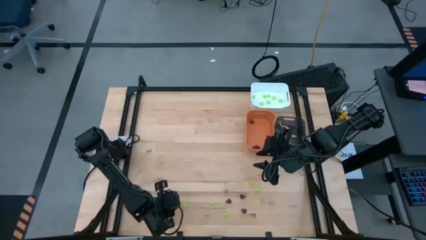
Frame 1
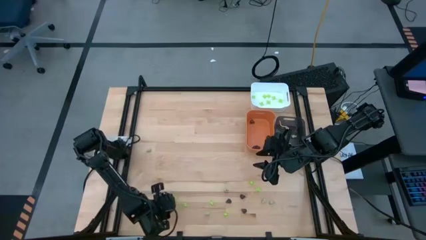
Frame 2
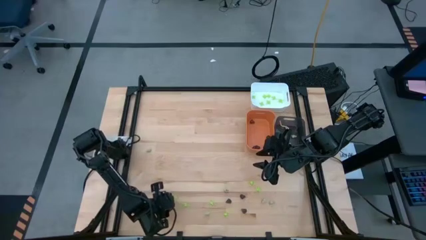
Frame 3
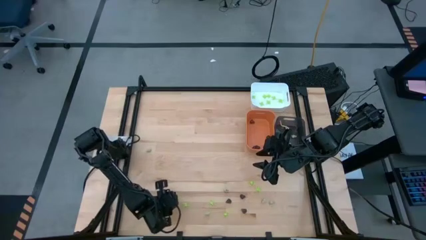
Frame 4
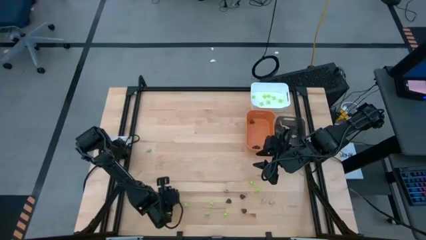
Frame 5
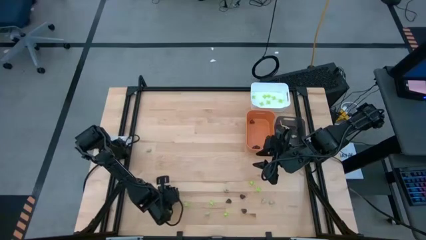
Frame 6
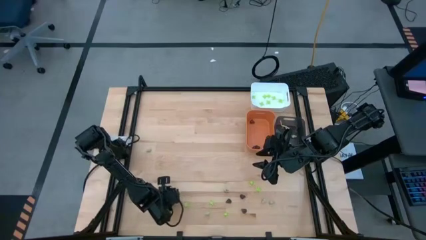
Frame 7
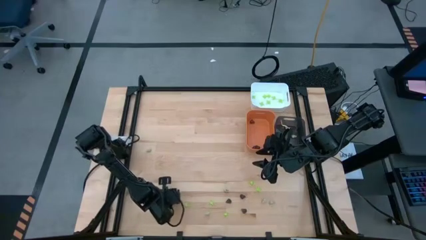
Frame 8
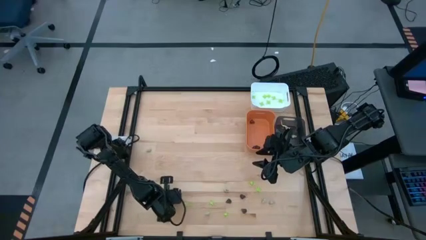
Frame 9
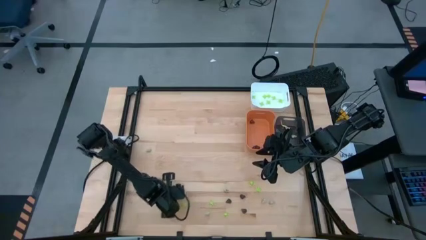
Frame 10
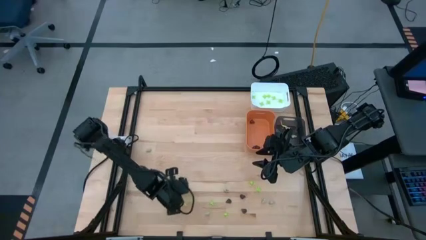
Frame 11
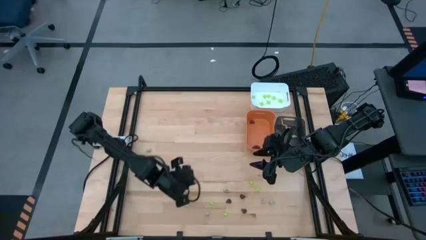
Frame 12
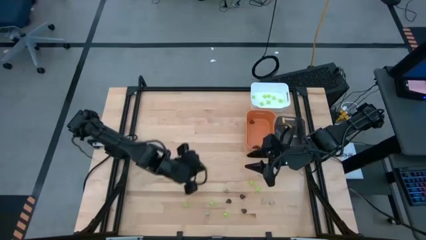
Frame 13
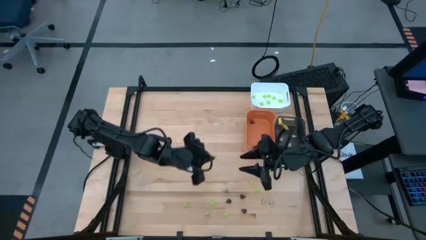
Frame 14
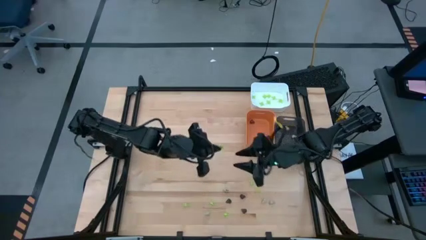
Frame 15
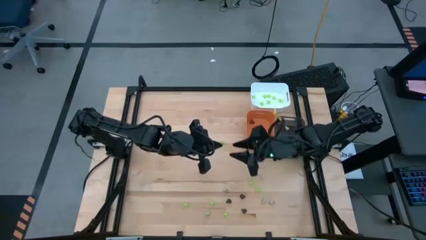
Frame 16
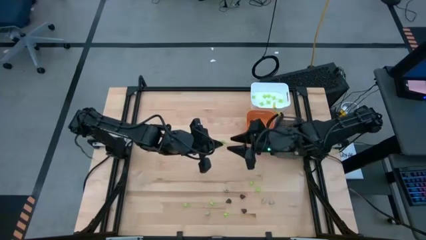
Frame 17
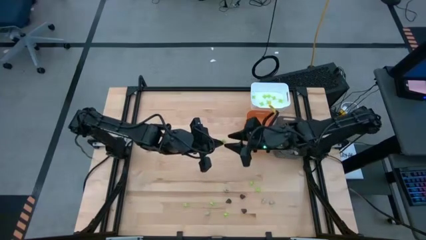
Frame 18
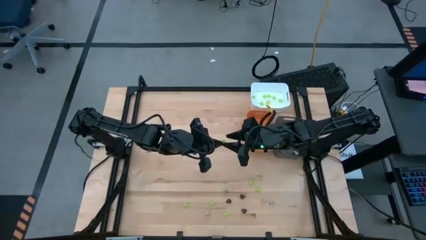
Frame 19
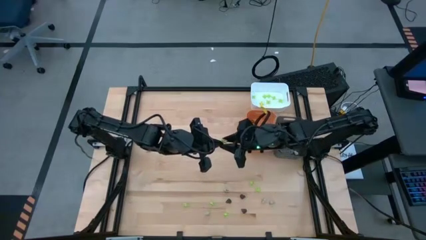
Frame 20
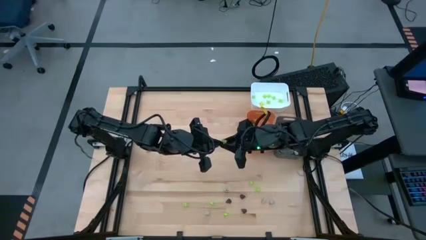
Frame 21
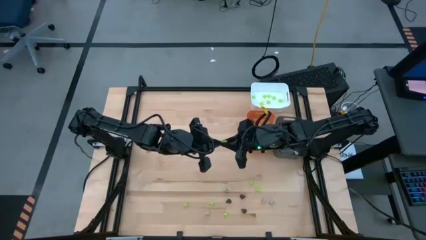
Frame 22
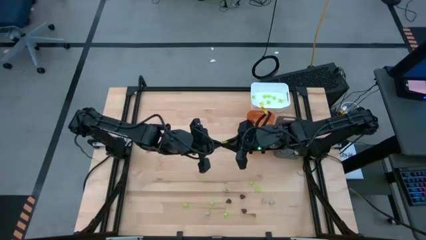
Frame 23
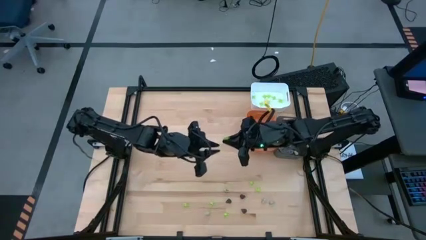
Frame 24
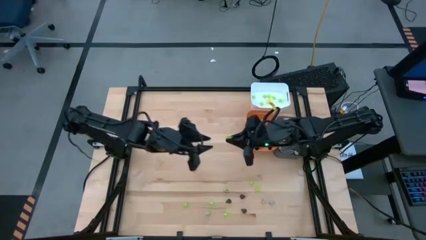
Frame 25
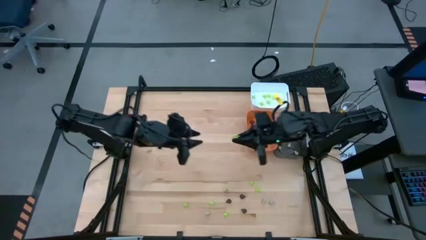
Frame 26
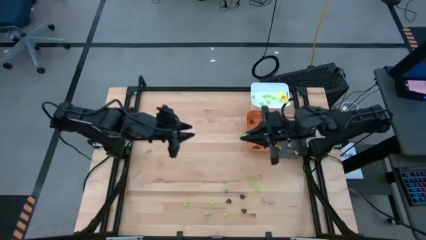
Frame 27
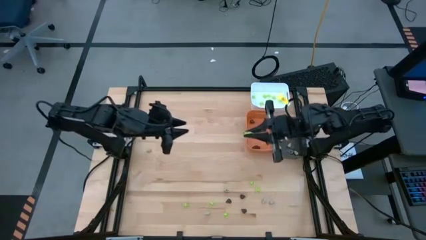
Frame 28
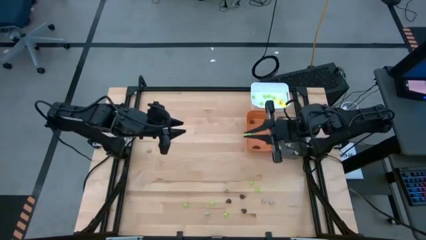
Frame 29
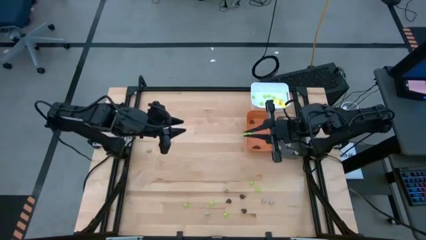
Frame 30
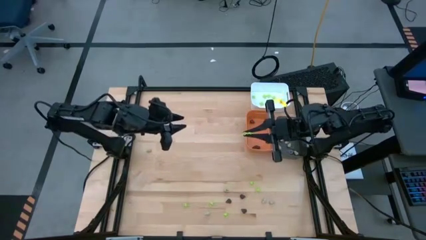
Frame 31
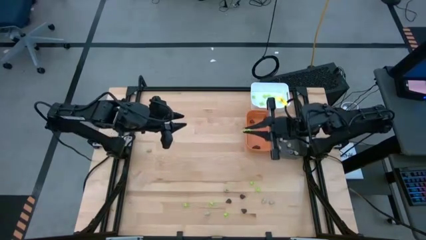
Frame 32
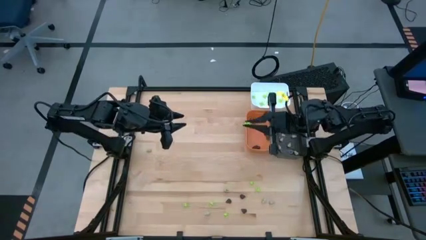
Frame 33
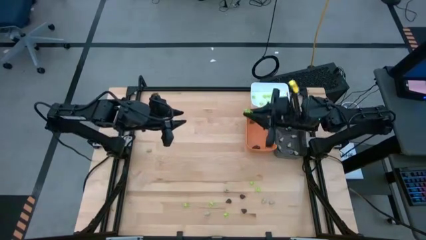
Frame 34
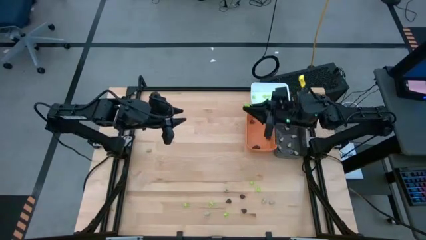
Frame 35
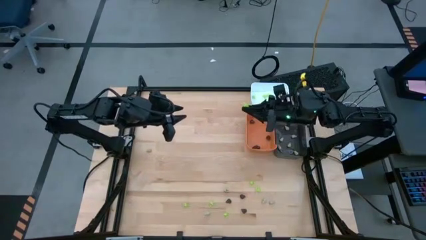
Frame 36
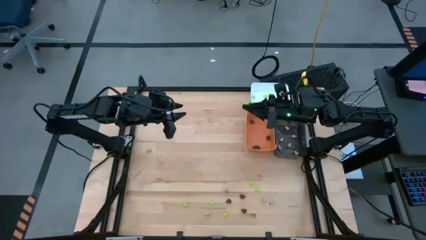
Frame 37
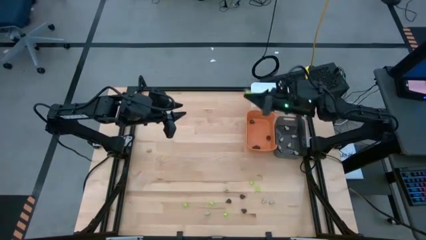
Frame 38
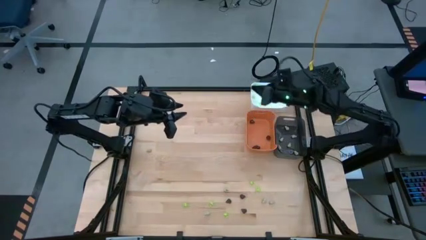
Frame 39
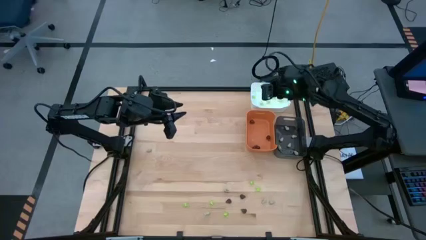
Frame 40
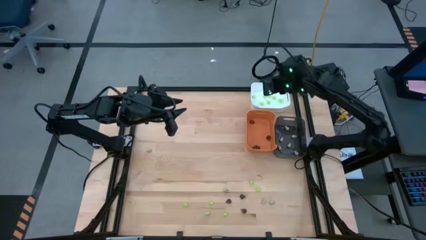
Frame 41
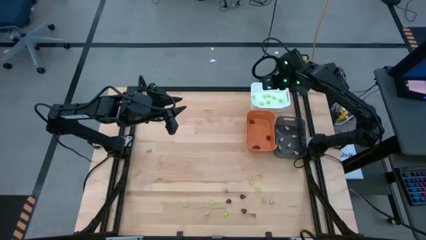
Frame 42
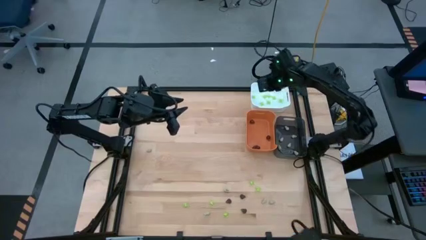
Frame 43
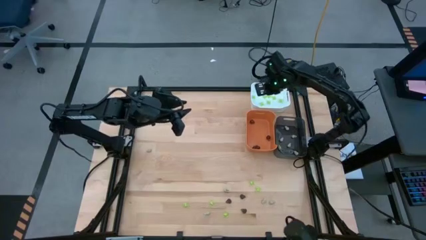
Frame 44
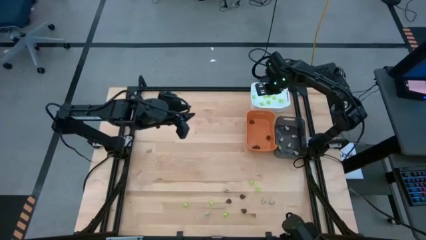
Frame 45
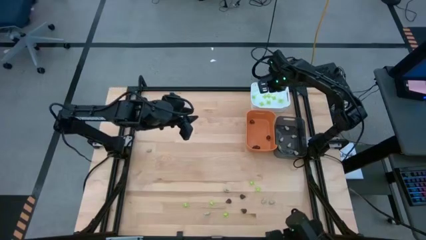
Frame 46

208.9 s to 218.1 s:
Task: Sort Halloween decoration
Put the green spider toy into the white bin

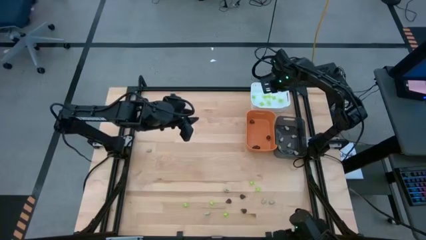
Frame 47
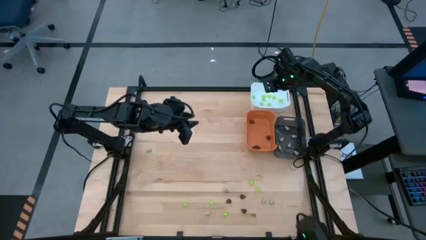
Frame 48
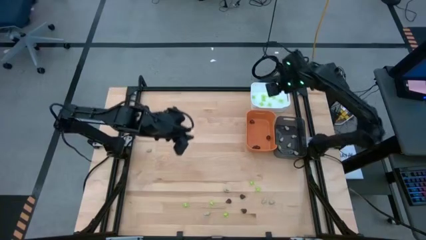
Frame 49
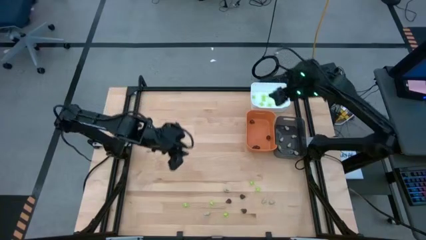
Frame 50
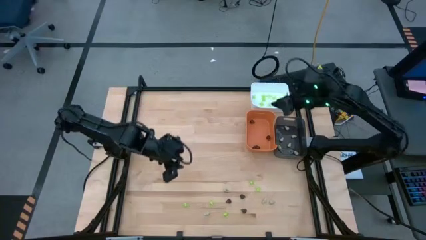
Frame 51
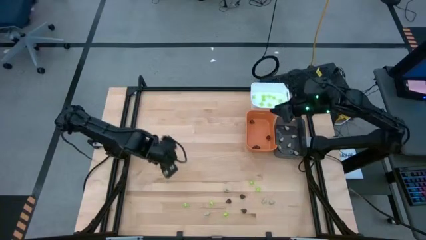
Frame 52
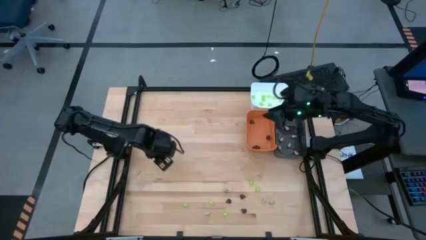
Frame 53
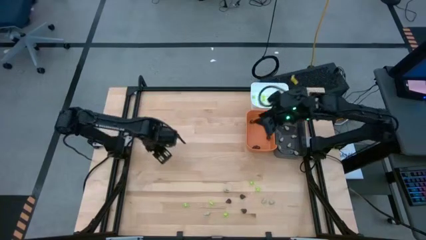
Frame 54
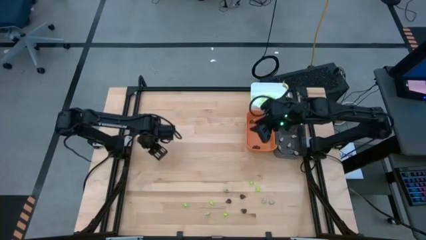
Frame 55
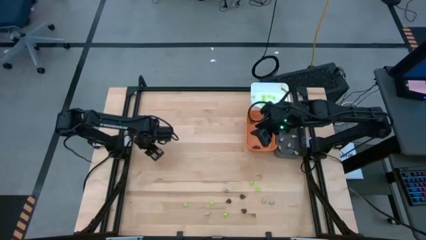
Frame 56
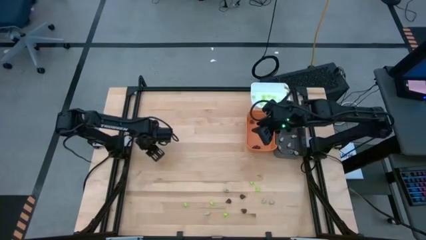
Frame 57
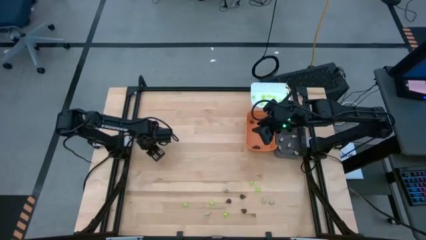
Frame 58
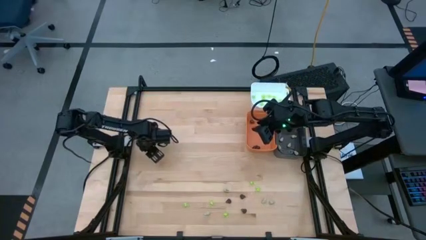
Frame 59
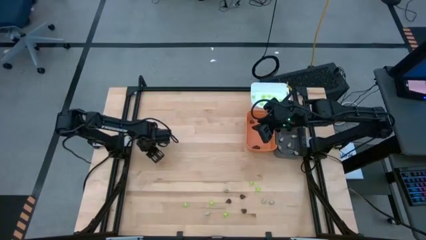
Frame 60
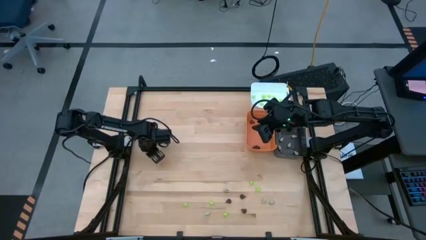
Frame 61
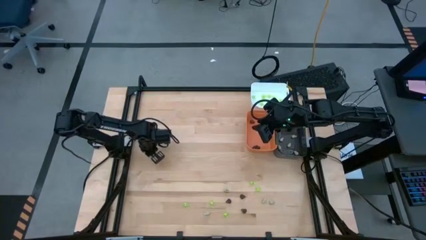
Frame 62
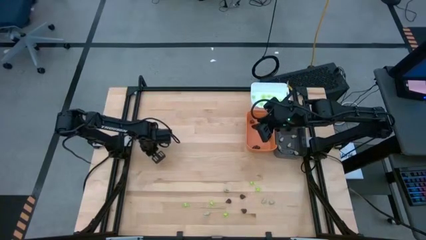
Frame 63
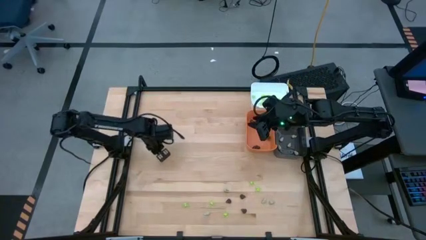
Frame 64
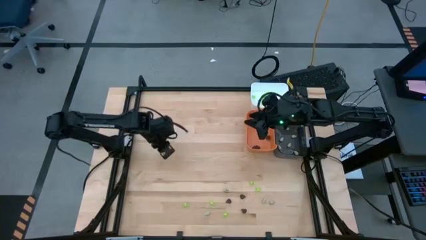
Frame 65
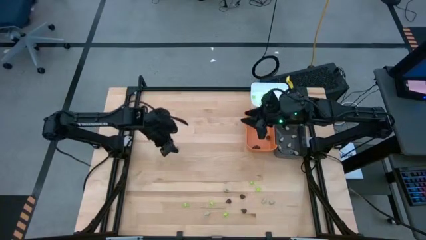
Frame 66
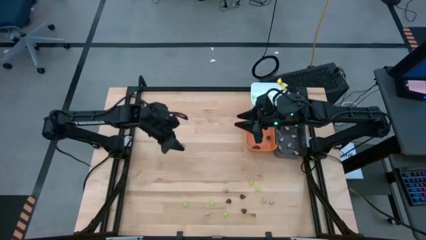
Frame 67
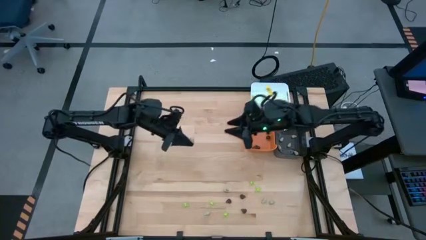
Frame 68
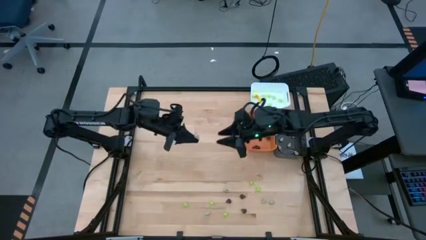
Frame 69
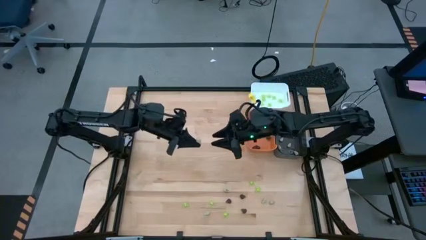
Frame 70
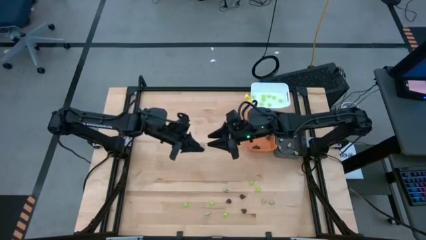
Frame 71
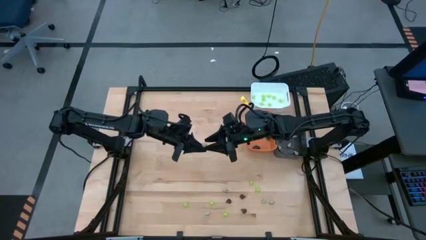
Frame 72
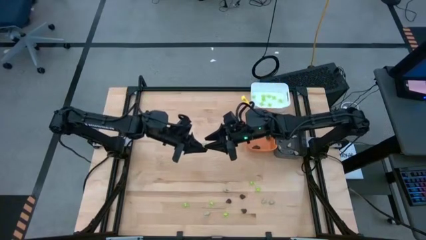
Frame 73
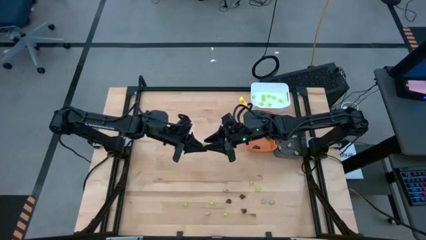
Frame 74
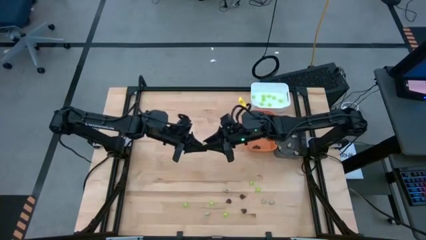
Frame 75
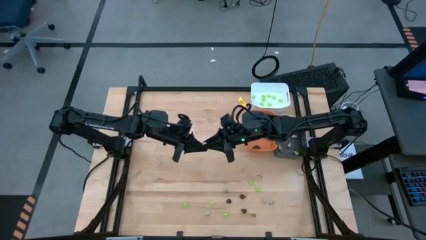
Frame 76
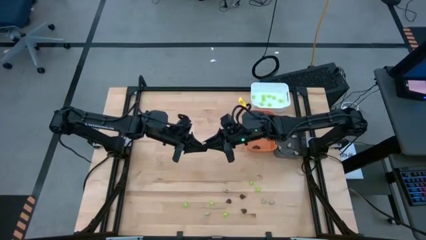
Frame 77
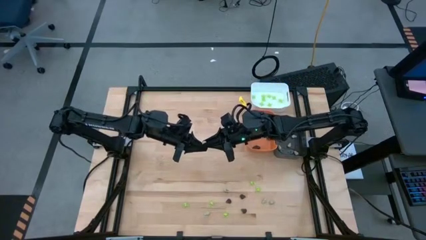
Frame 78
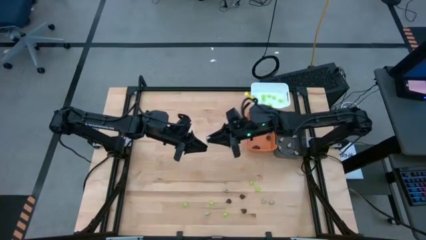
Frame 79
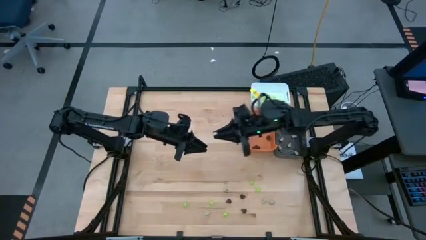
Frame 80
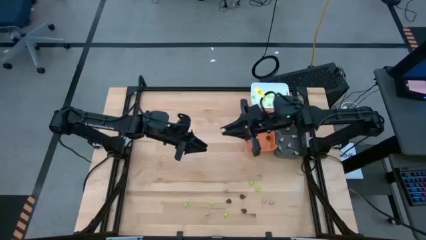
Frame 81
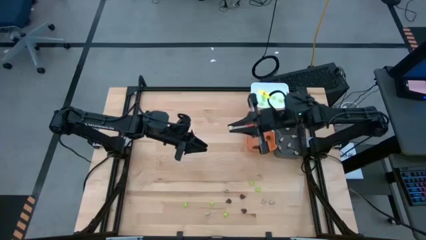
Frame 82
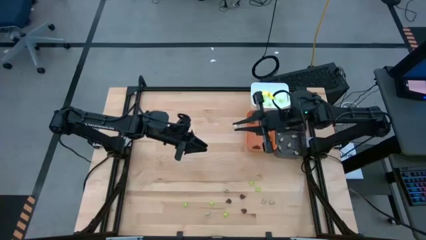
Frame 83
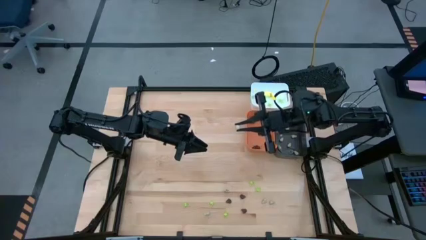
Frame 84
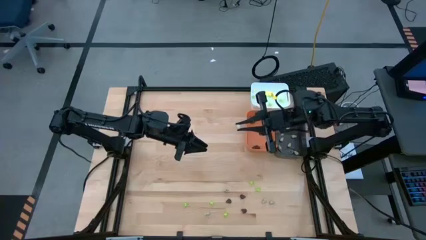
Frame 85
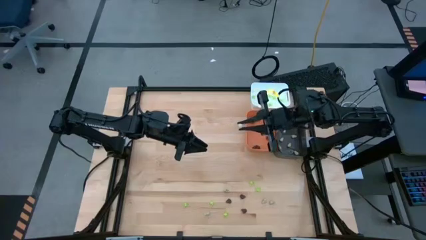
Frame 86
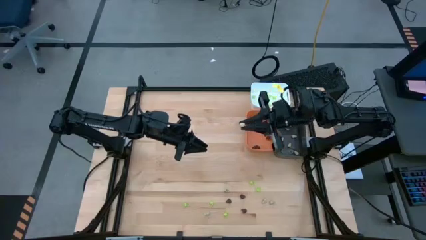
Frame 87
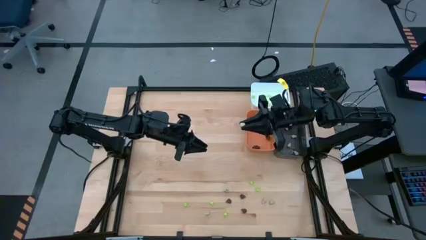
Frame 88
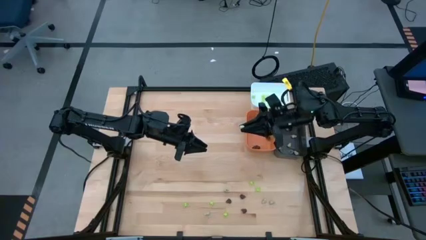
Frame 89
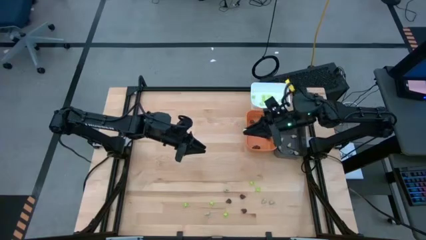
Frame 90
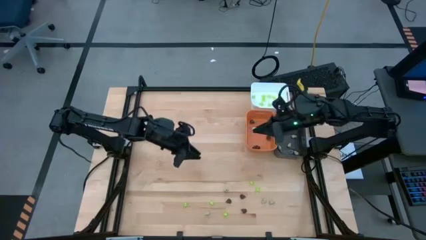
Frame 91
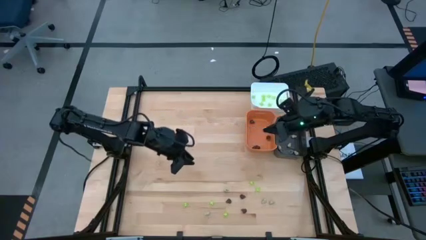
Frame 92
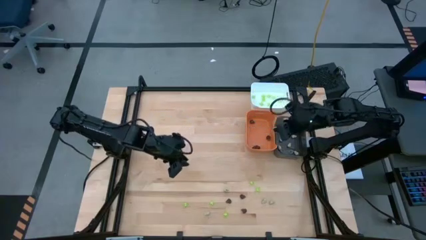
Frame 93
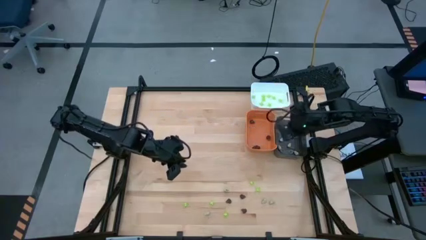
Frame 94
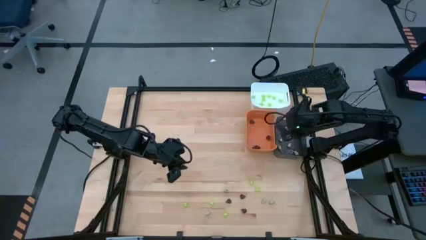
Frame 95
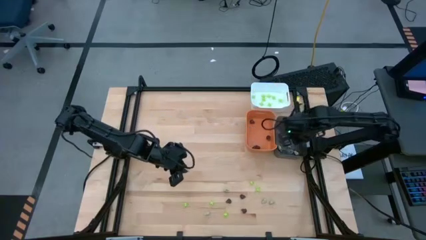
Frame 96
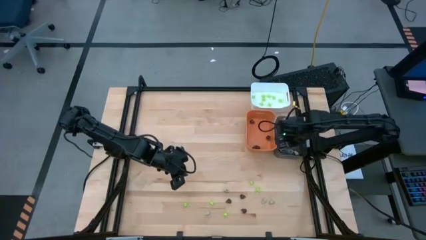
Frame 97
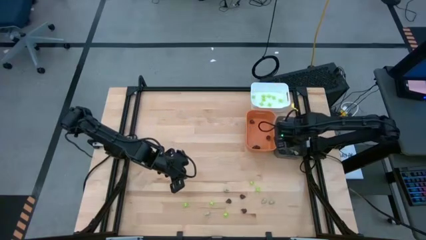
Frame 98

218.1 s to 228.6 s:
Put the white skull toy into the black bin
